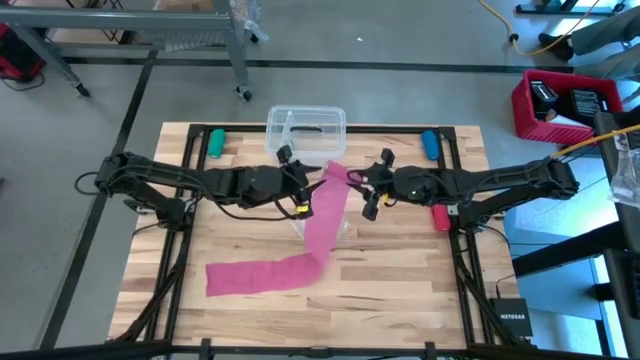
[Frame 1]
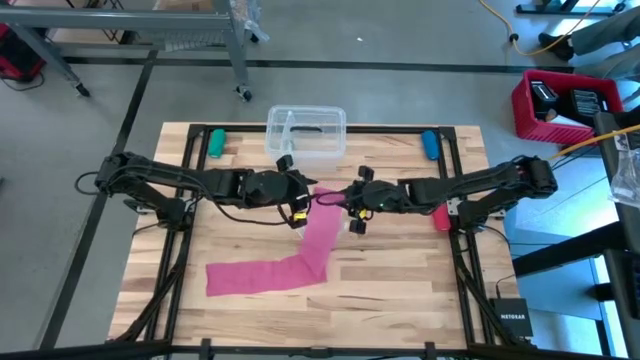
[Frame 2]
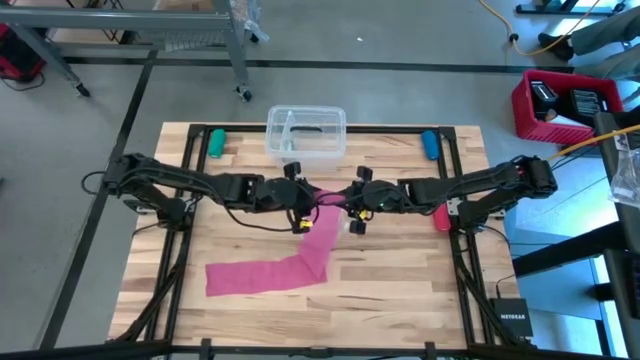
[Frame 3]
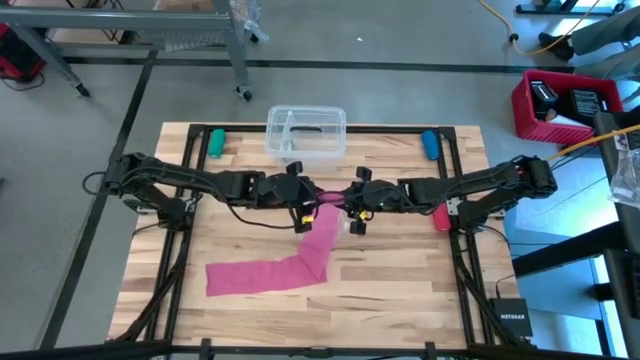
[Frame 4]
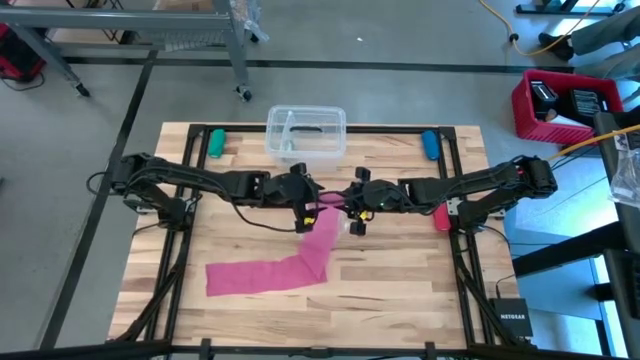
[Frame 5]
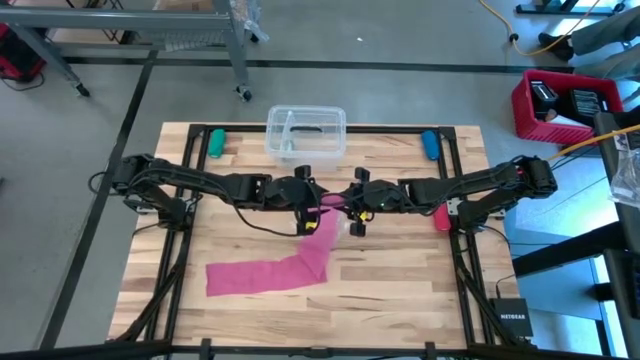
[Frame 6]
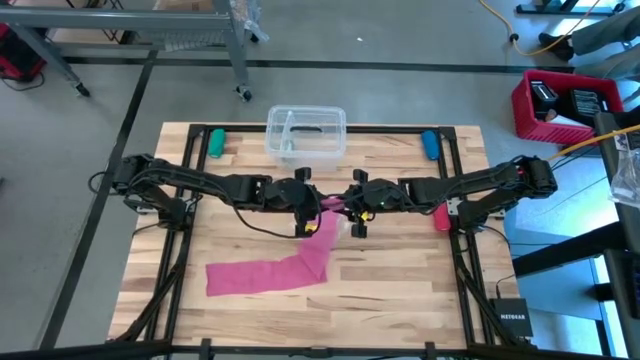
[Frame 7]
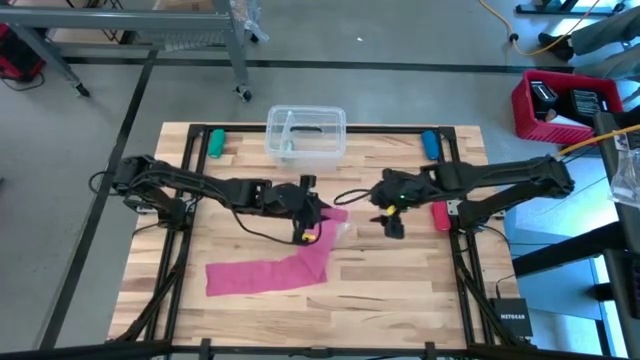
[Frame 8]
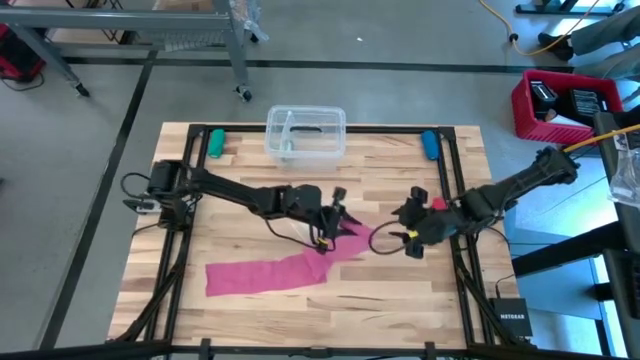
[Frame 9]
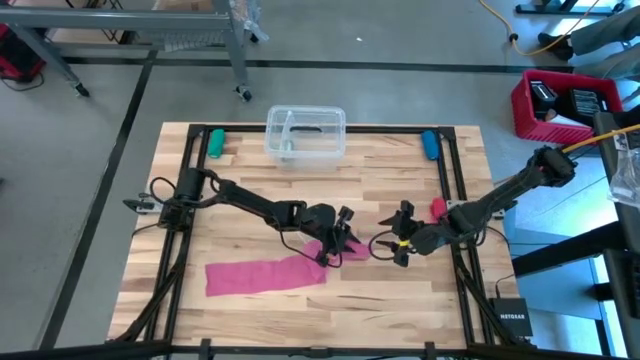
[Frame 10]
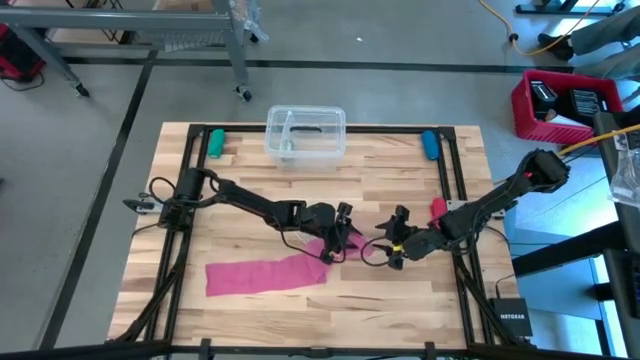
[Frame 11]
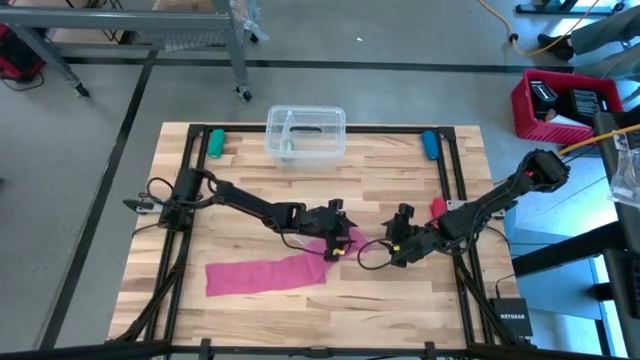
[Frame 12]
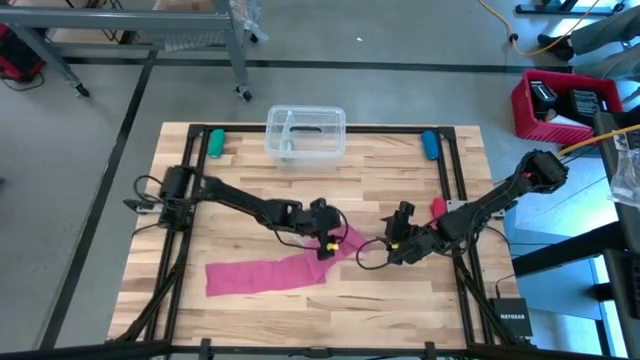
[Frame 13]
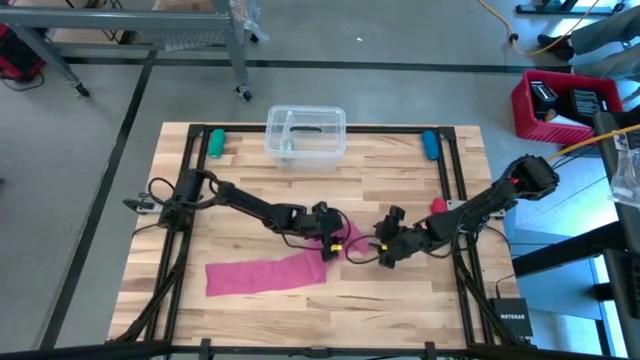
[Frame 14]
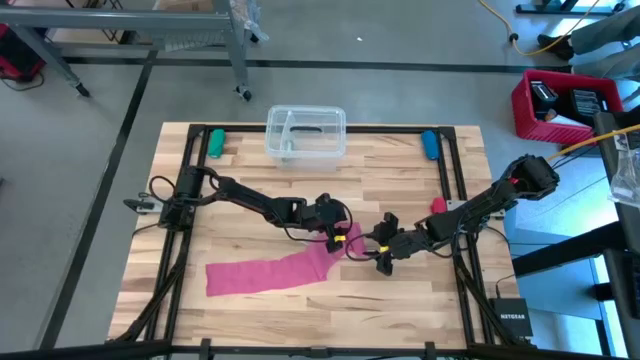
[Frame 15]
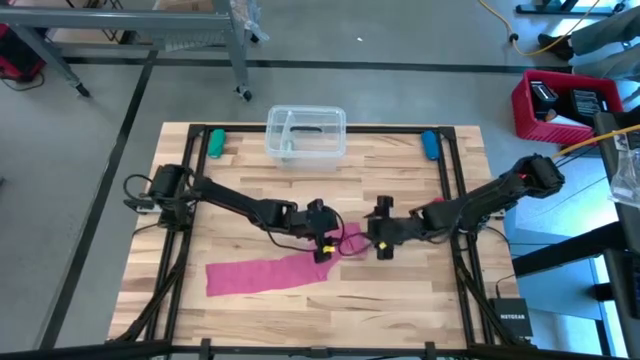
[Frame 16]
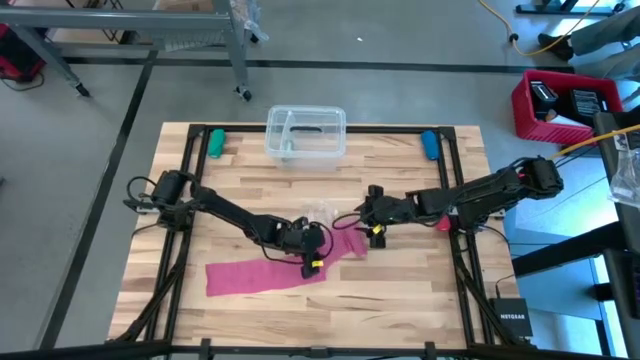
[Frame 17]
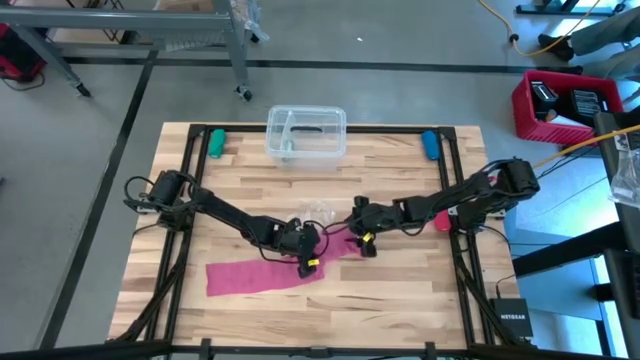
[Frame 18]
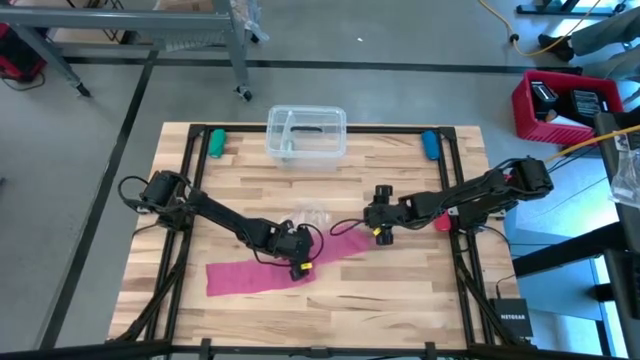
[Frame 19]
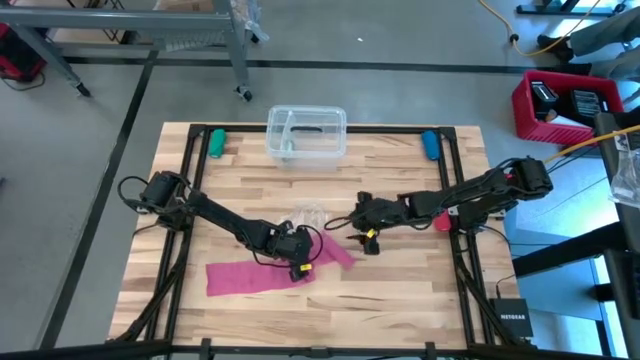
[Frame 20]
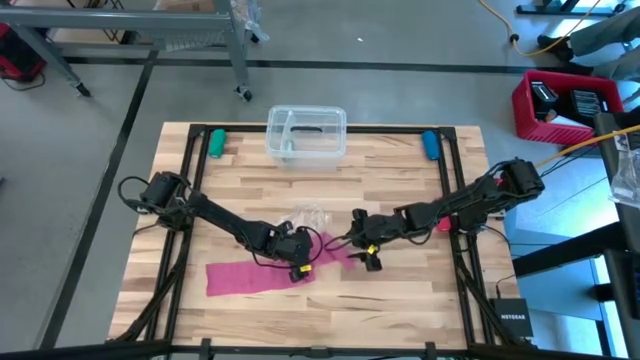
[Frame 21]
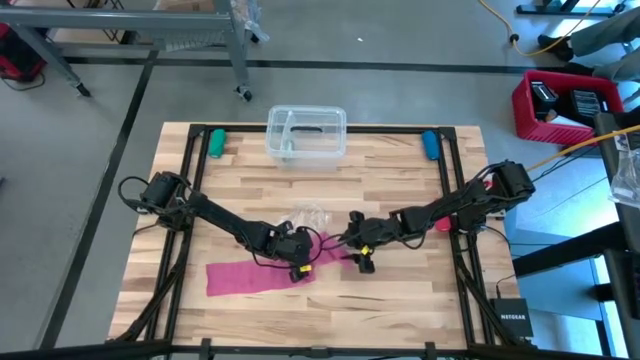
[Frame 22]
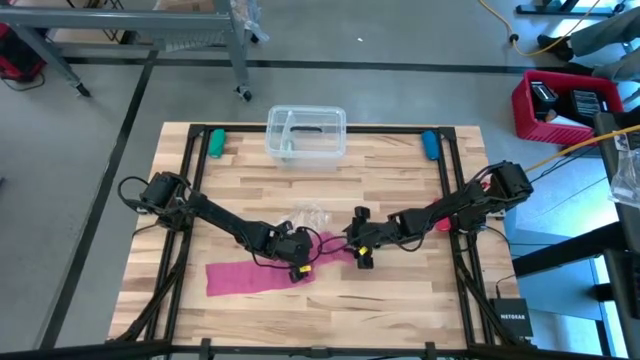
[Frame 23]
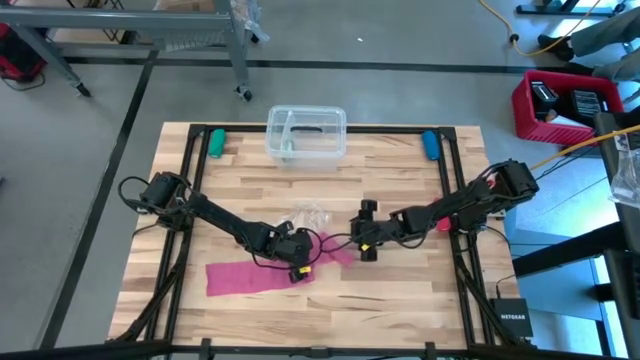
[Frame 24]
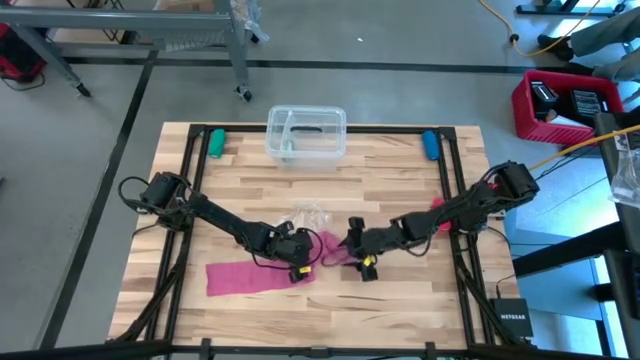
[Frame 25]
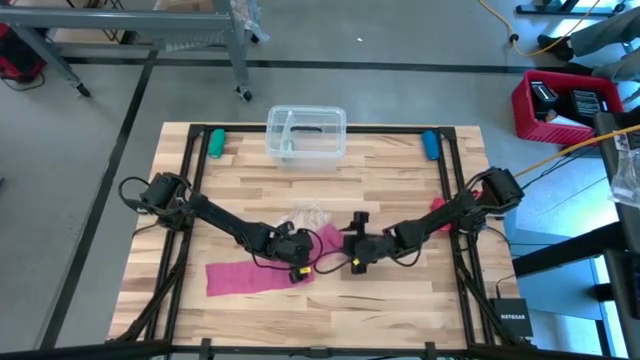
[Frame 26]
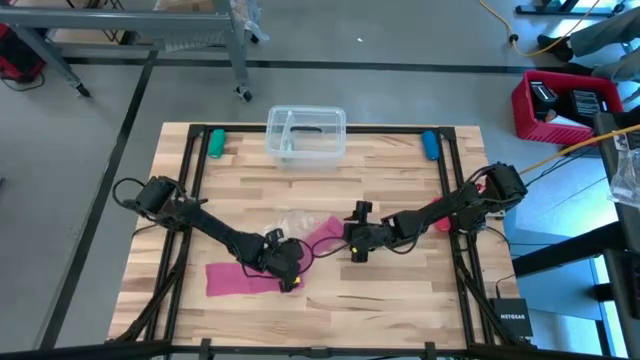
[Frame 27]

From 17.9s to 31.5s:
Task: Roll bandage
Roll the pink bandage
